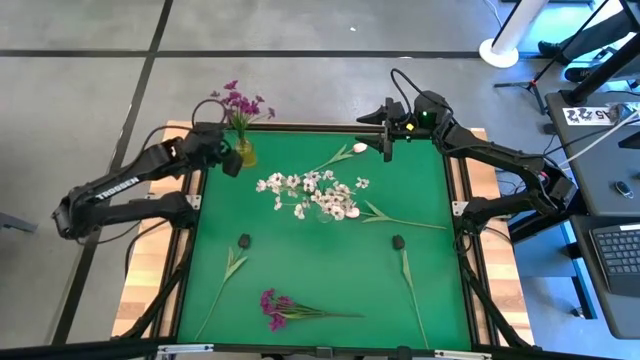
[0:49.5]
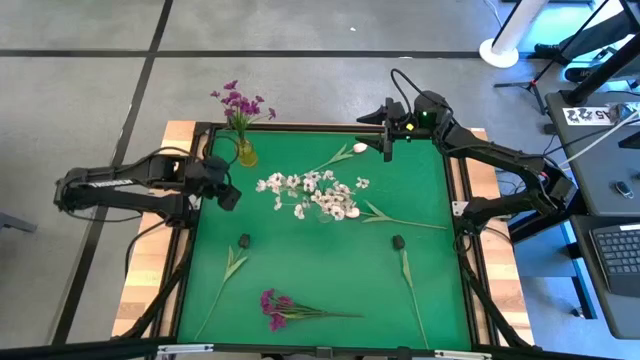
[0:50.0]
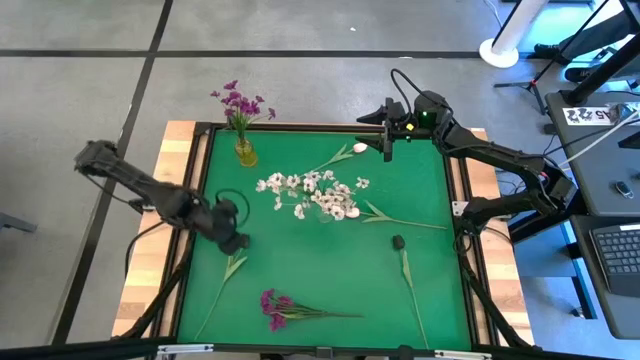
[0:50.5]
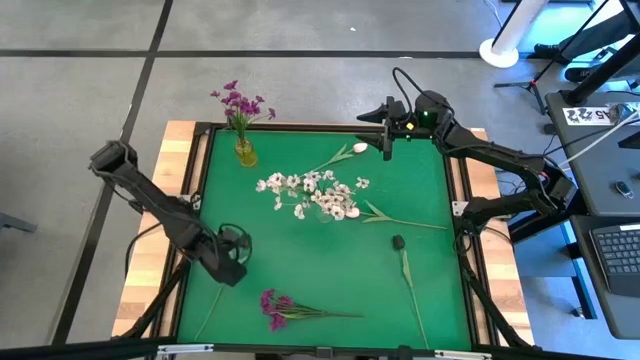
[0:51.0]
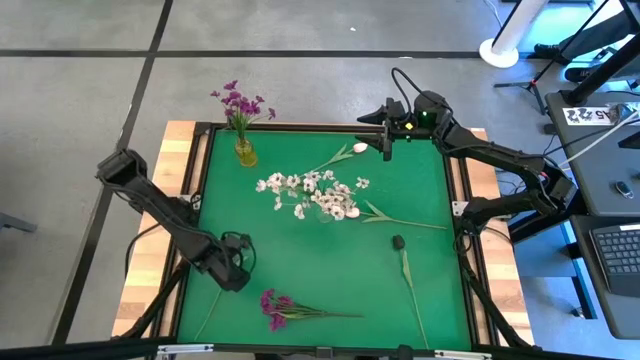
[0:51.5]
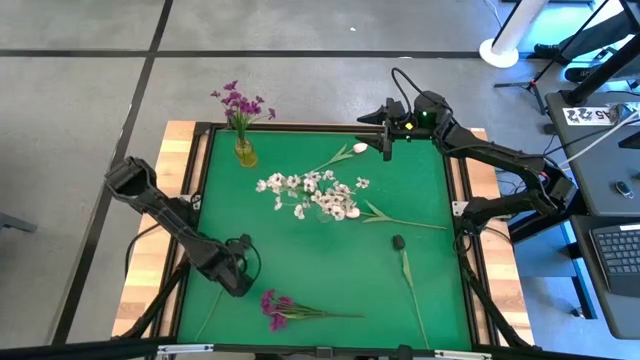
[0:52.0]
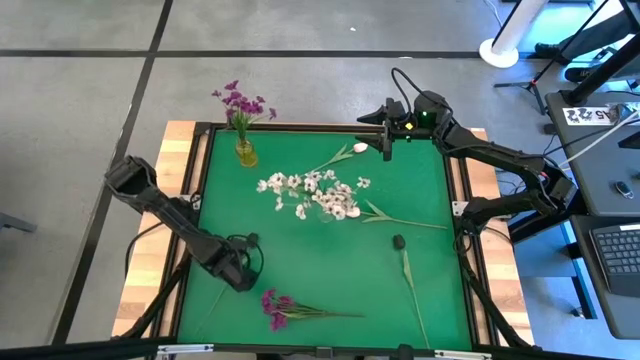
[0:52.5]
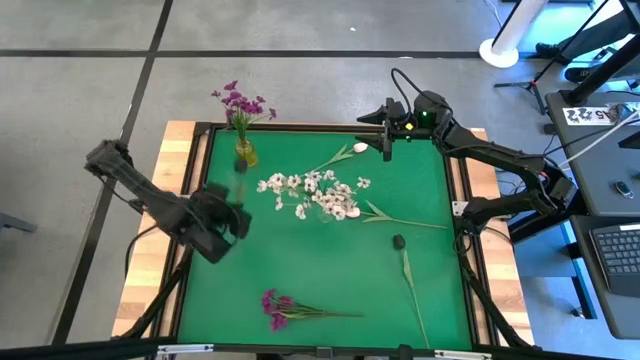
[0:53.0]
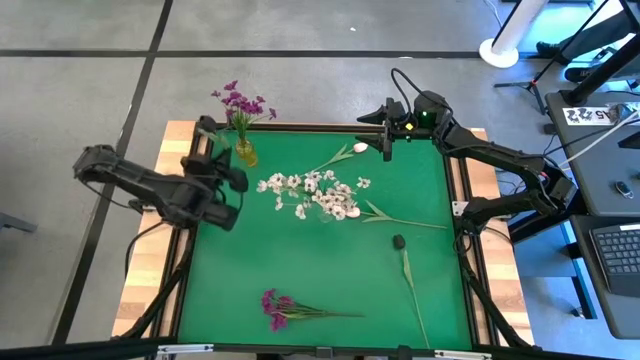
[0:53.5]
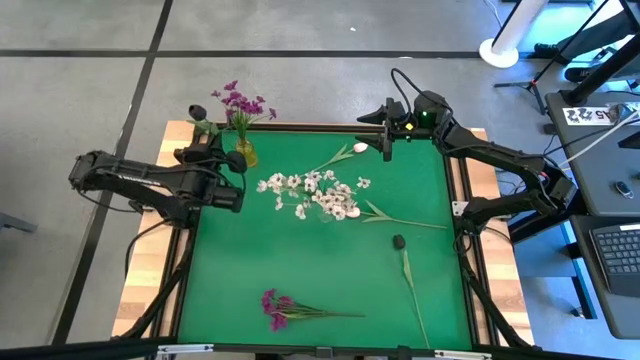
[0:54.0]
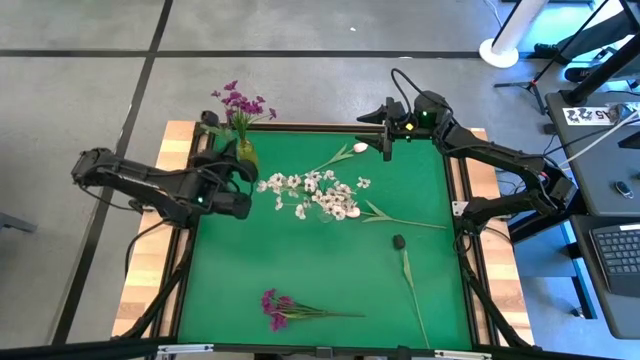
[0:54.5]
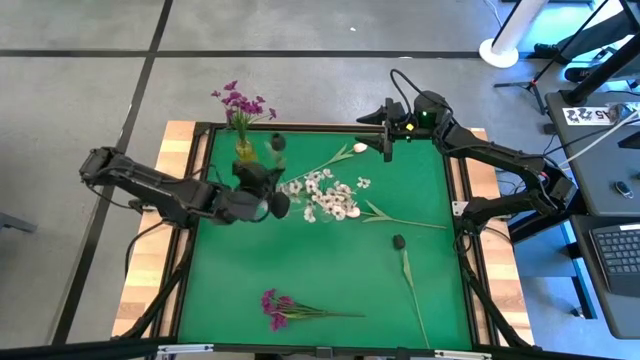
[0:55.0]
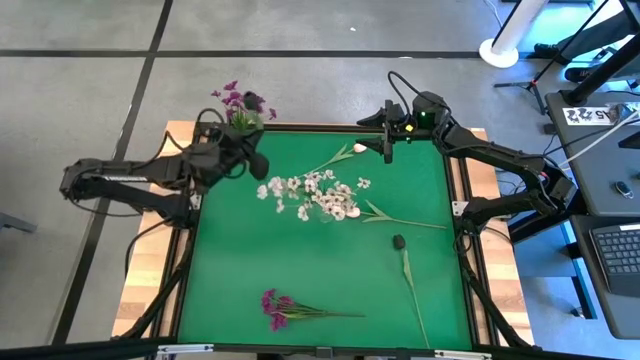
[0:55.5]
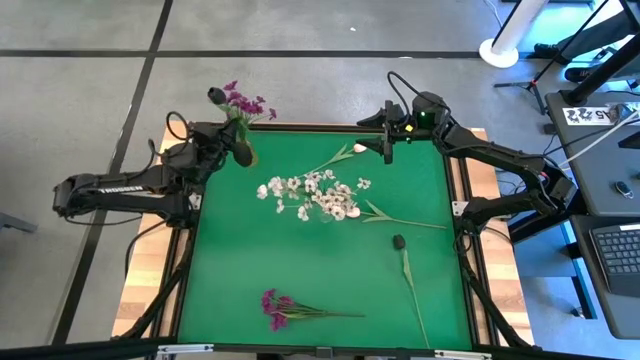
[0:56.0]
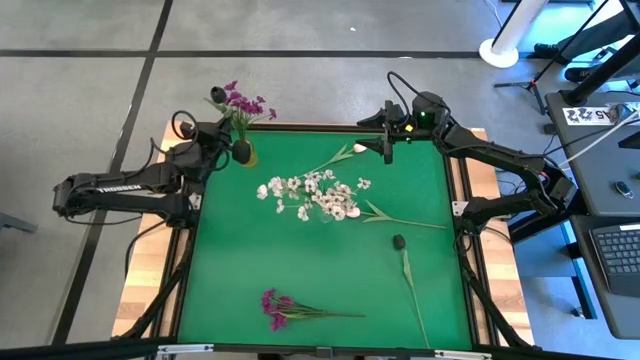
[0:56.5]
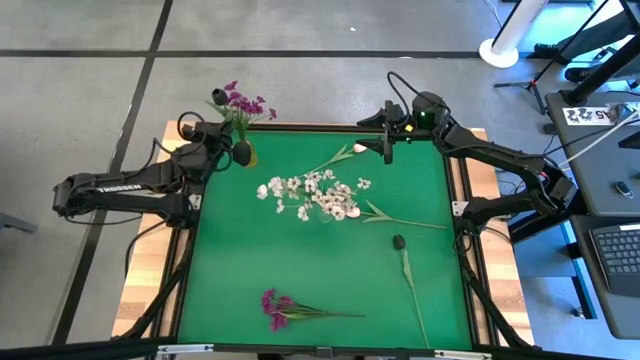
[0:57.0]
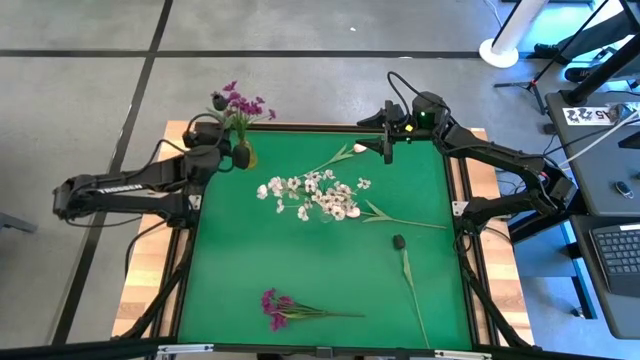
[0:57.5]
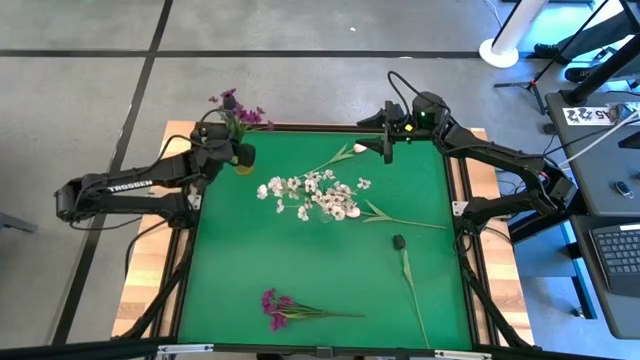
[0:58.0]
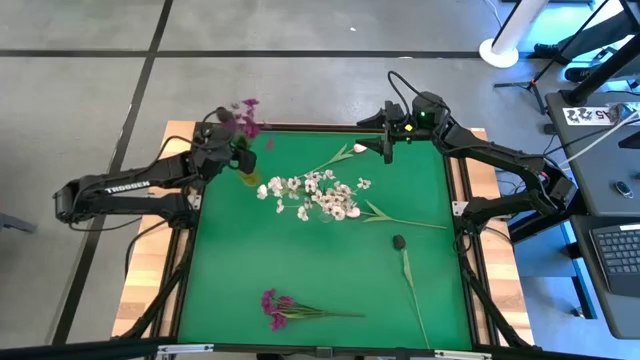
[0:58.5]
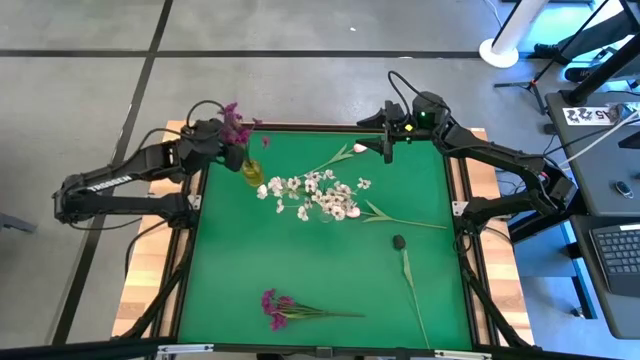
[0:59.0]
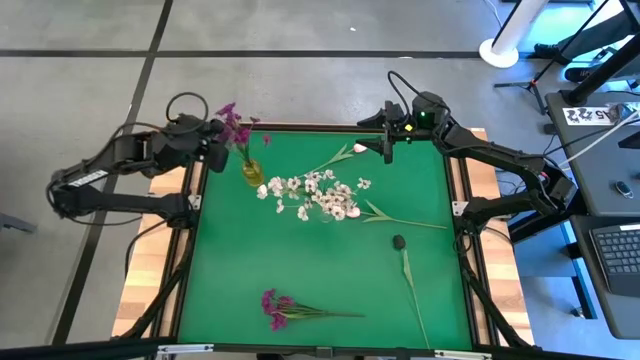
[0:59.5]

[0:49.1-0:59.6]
Task: Sort flowers into vase by color
Put the left black flower into the yellow vase

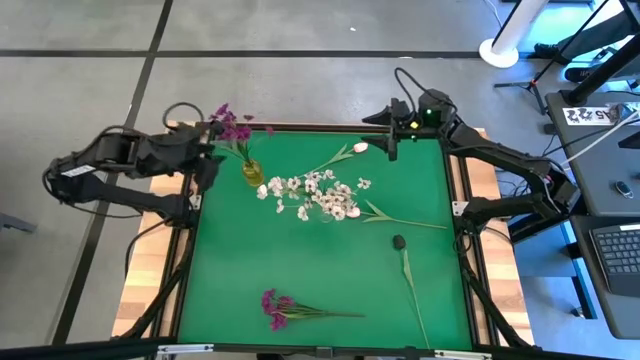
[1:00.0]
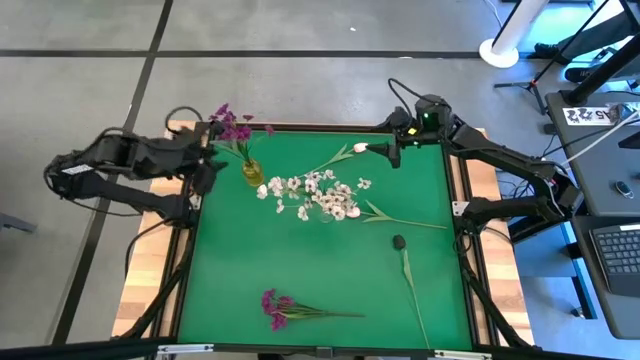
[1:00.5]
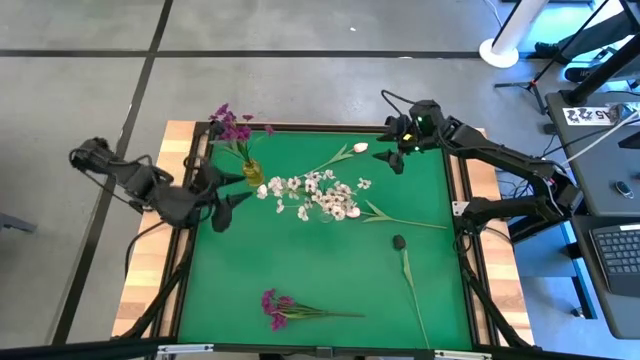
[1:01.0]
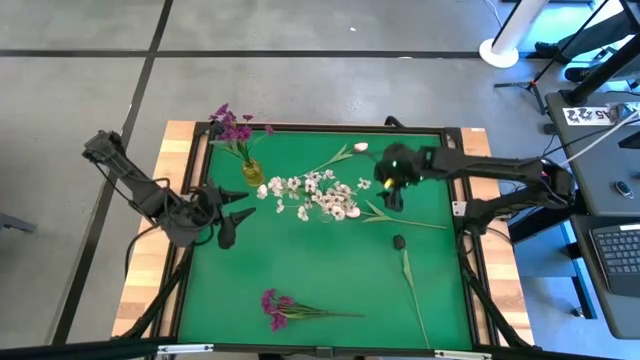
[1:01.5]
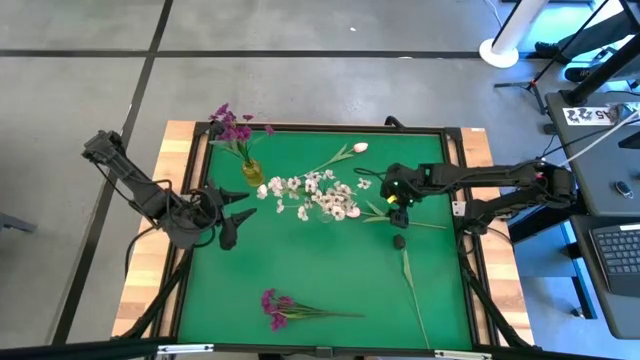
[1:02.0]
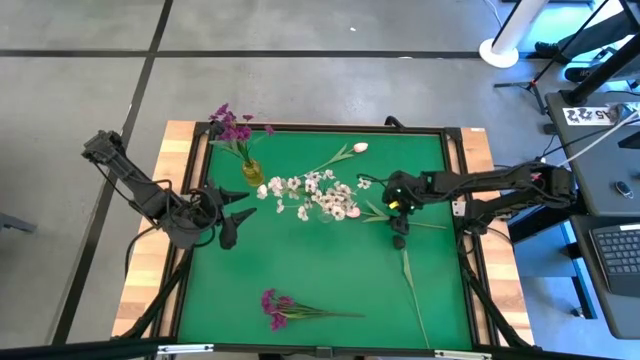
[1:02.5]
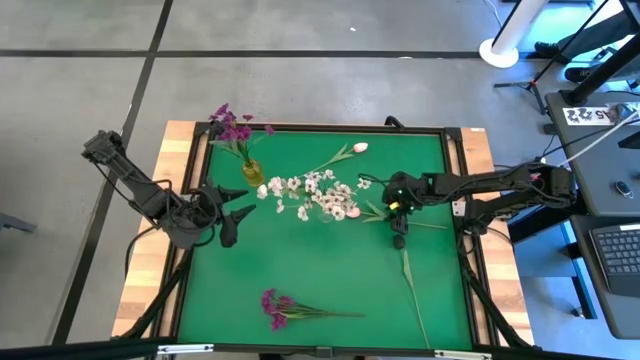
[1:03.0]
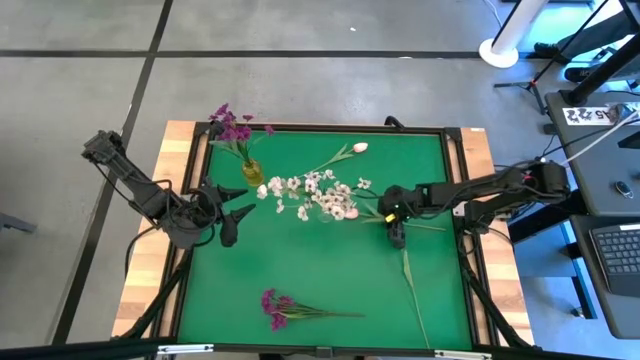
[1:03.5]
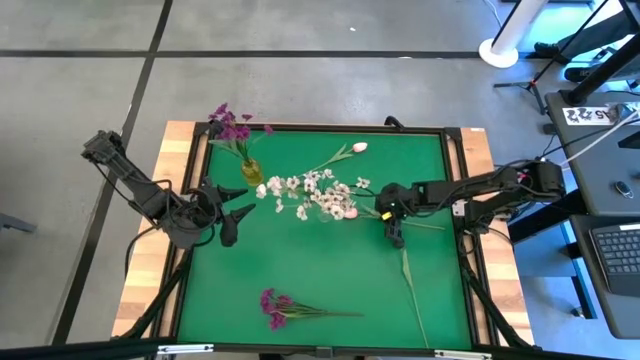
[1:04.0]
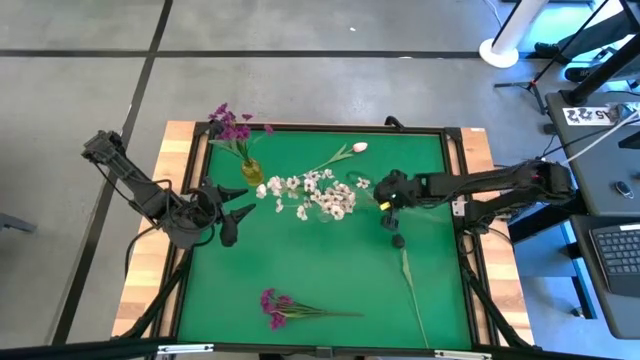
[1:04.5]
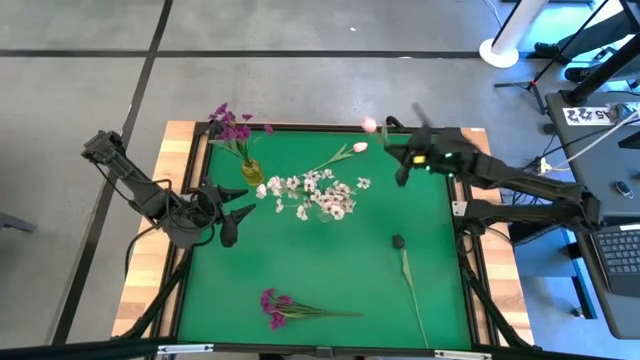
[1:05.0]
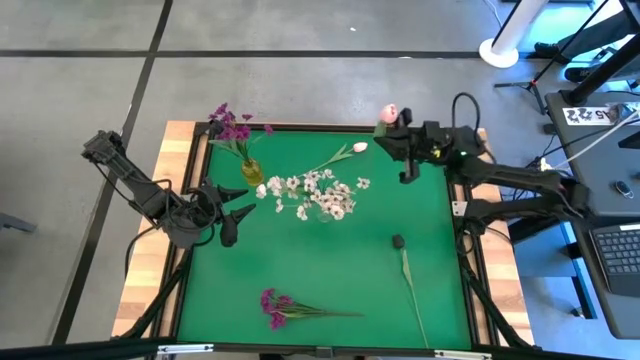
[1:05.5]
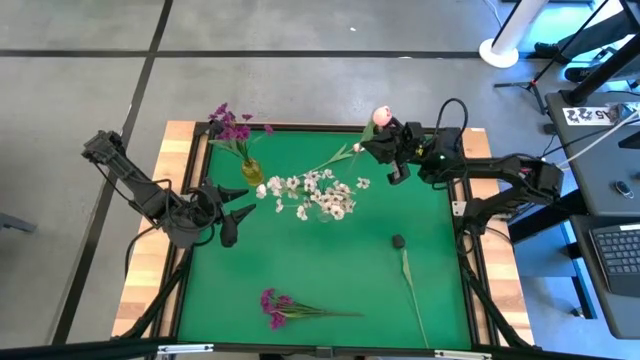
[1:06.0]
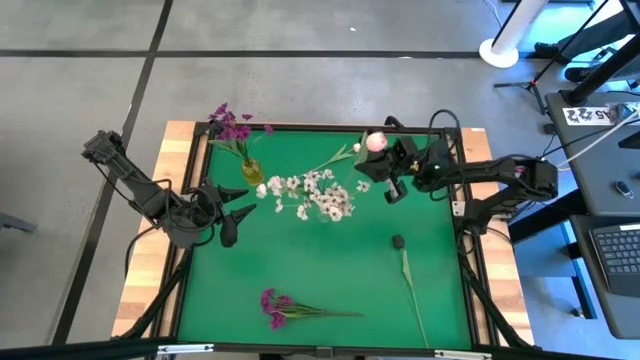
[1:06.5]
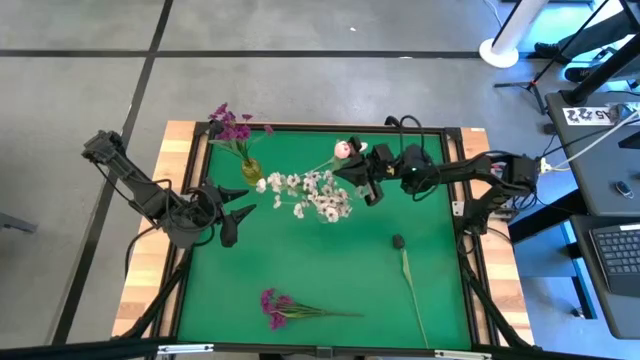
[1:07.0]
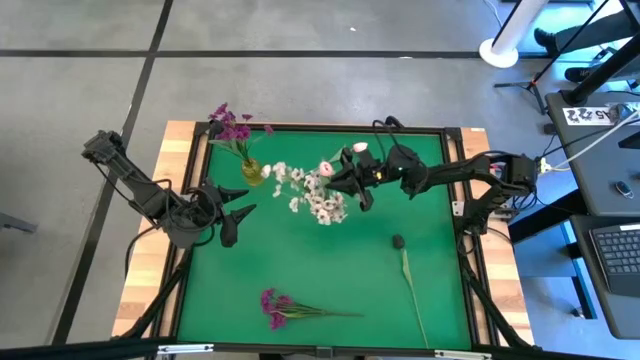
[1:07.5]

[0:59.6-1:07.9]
Put the bottom pink flower into the transparent vase

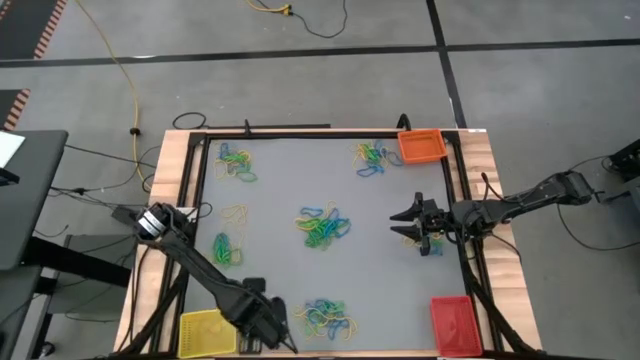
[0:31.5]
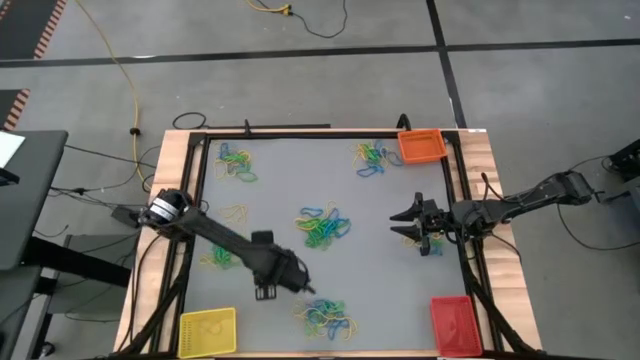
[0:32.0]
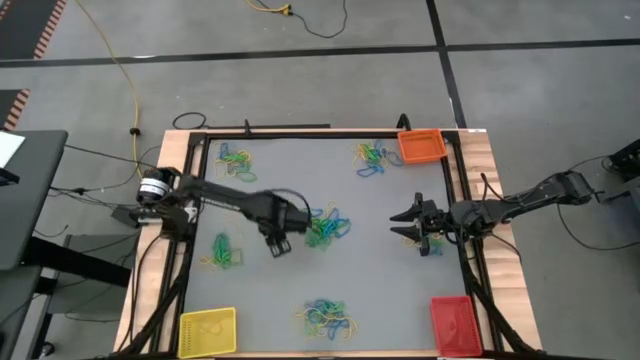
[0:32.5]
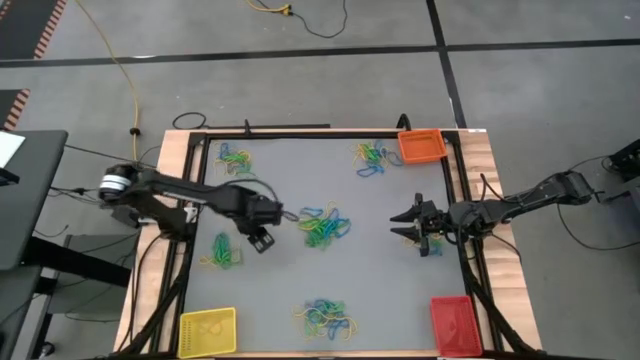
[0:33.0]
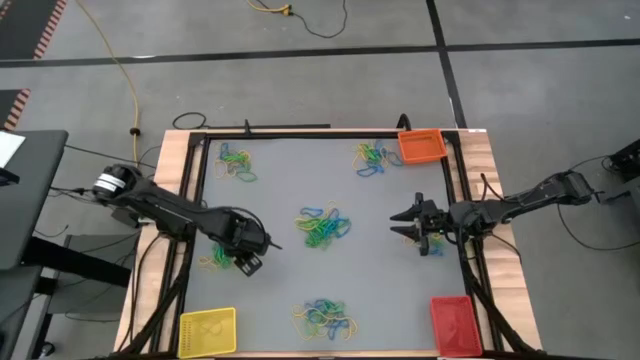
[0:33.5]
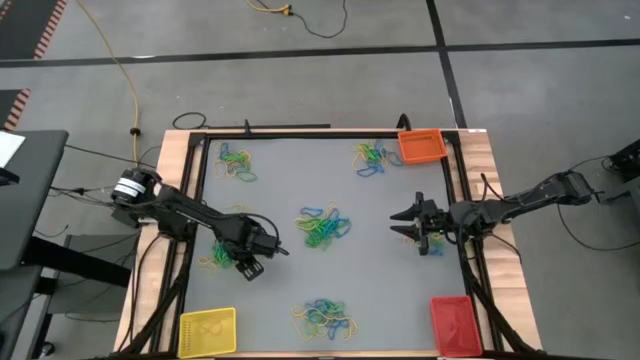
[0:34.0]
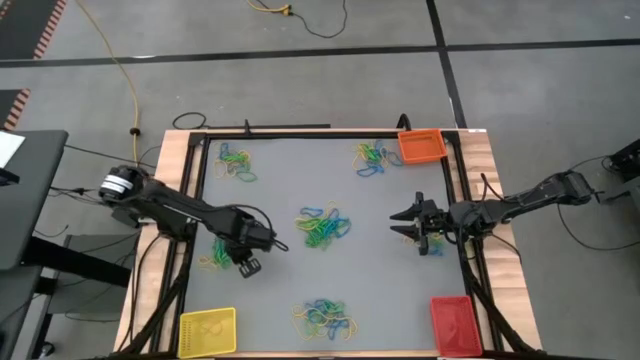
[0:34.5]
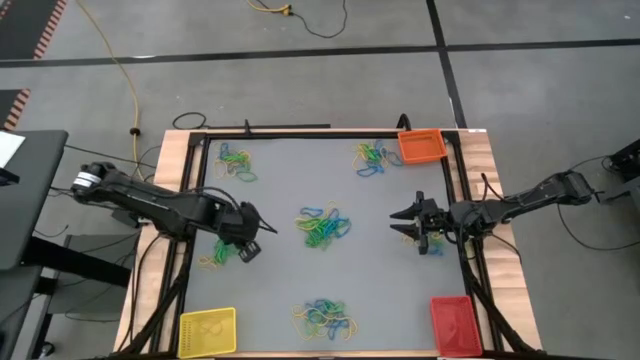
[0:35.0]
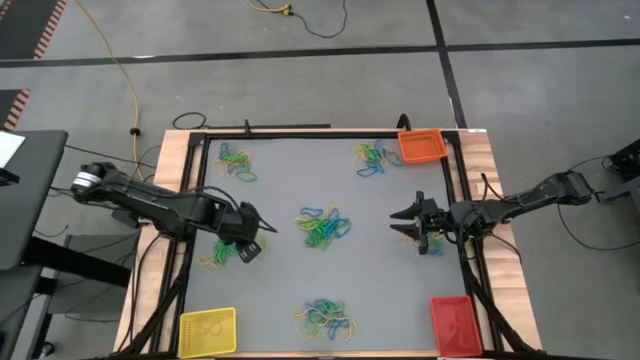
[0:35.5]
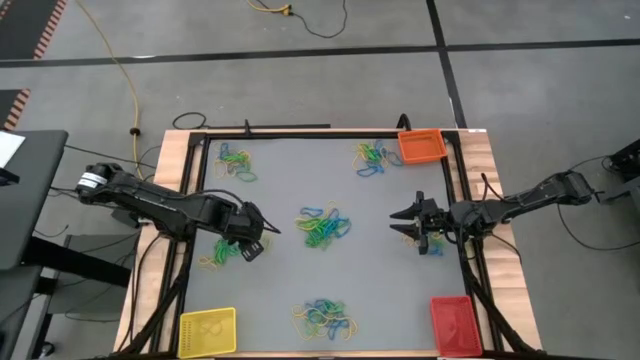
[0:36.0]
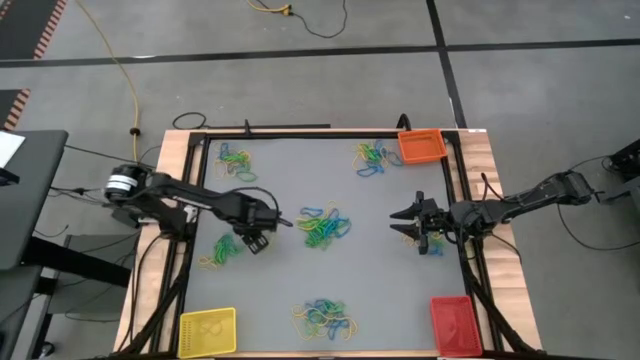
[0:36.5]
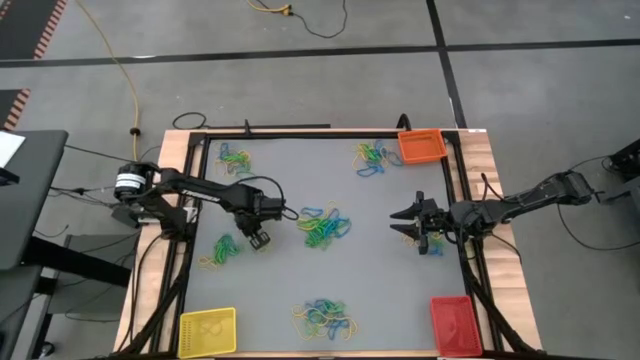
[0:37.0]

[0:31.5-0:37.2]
Task: Sort rubber bands into baskets
Put the yellow rubber band into the yellow bin
